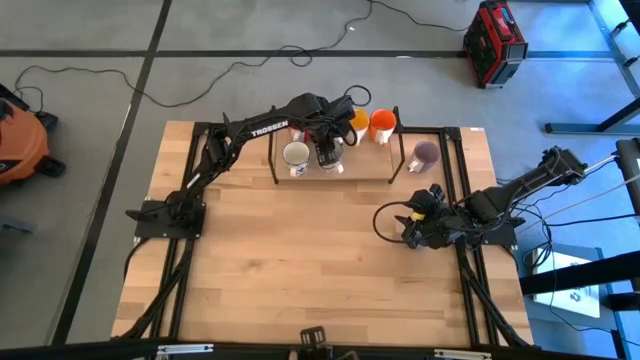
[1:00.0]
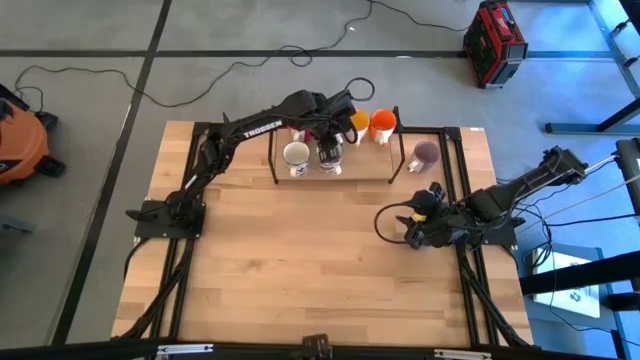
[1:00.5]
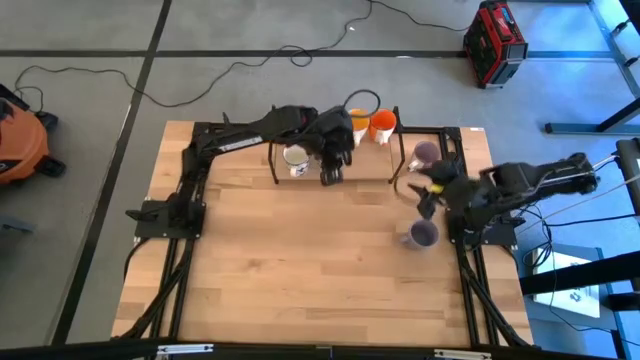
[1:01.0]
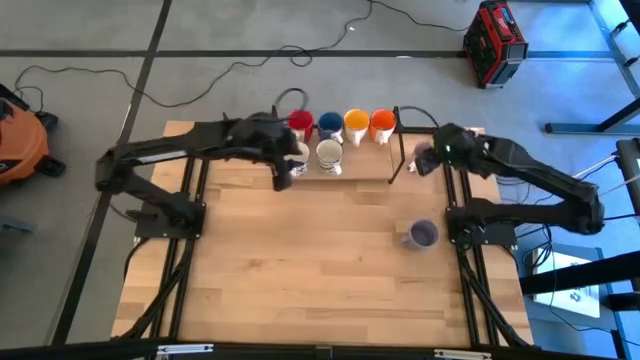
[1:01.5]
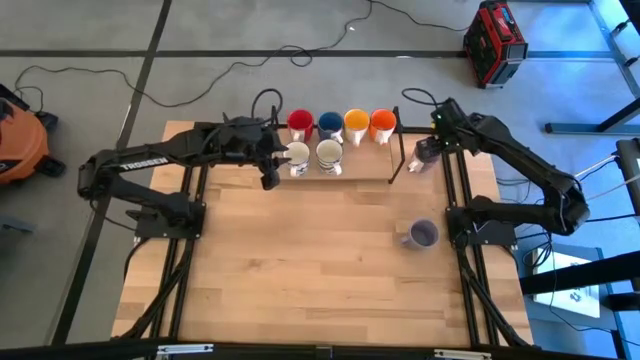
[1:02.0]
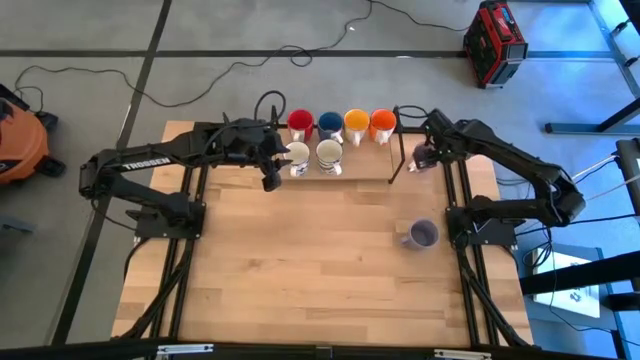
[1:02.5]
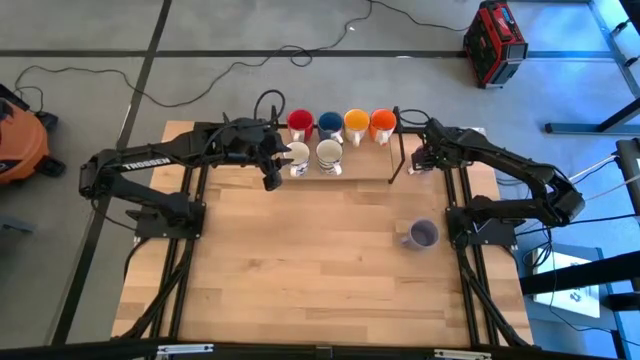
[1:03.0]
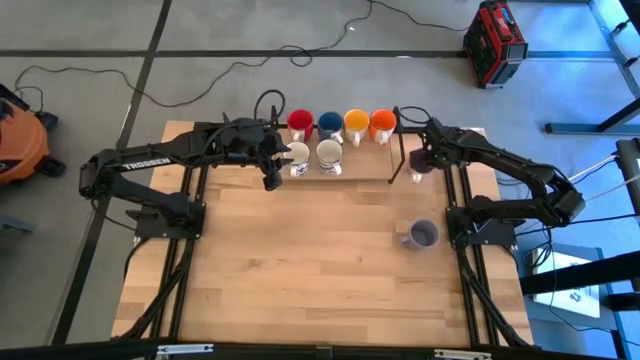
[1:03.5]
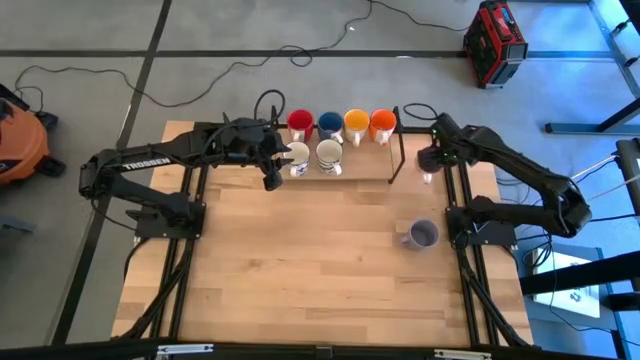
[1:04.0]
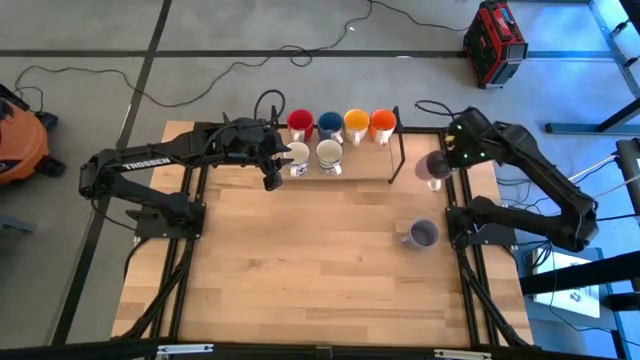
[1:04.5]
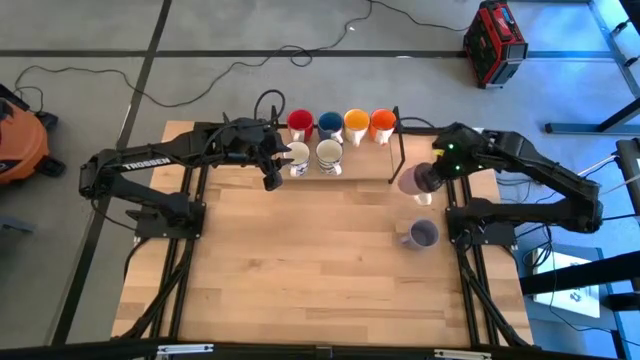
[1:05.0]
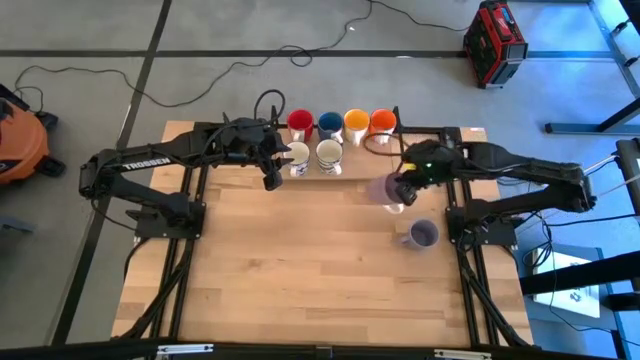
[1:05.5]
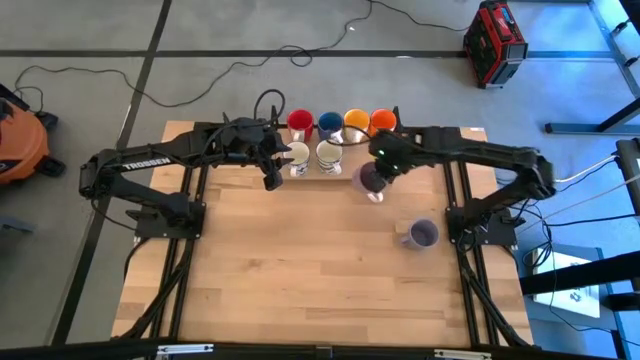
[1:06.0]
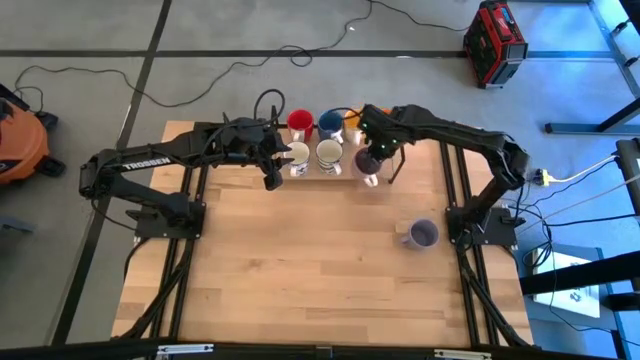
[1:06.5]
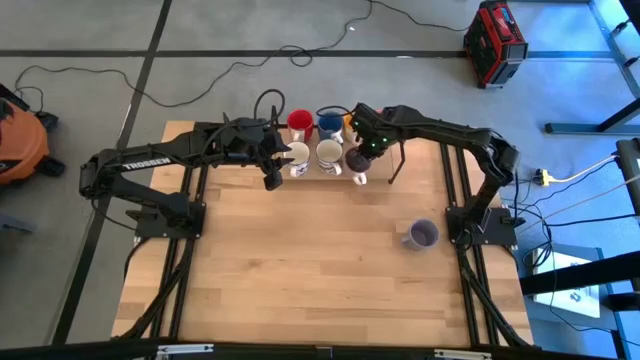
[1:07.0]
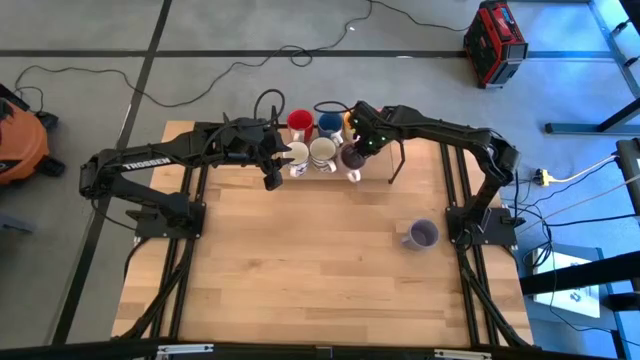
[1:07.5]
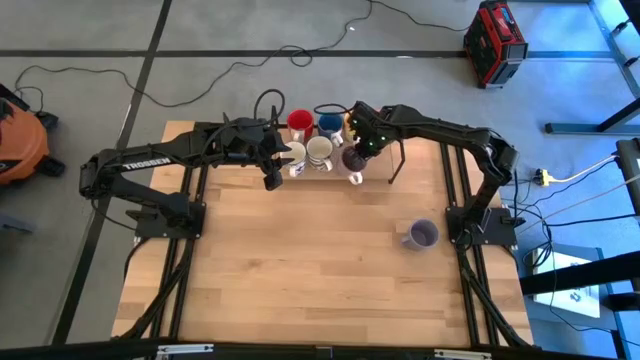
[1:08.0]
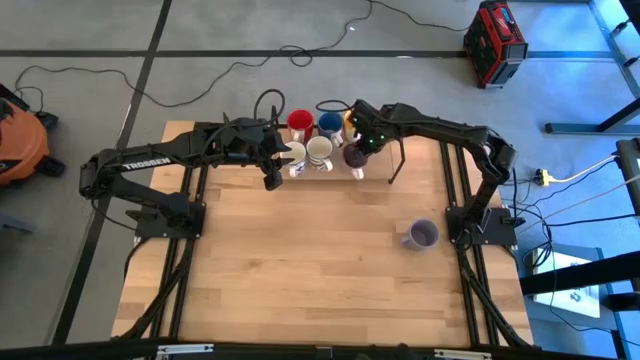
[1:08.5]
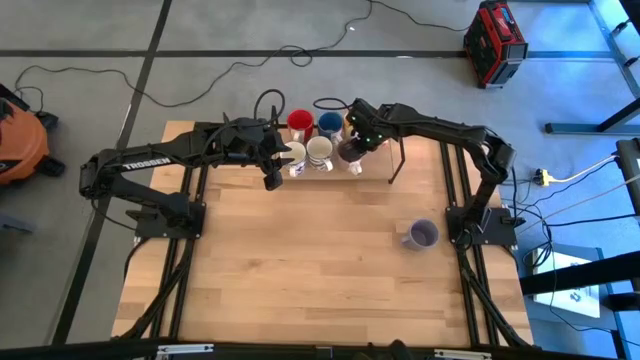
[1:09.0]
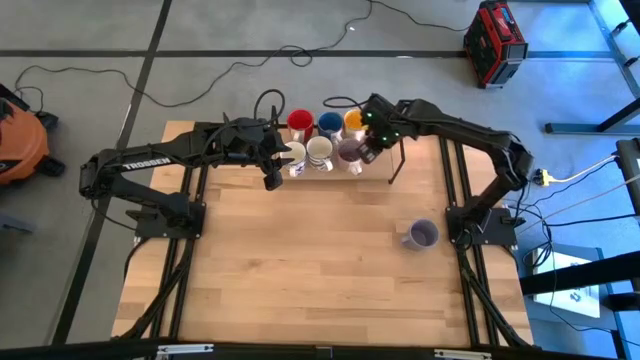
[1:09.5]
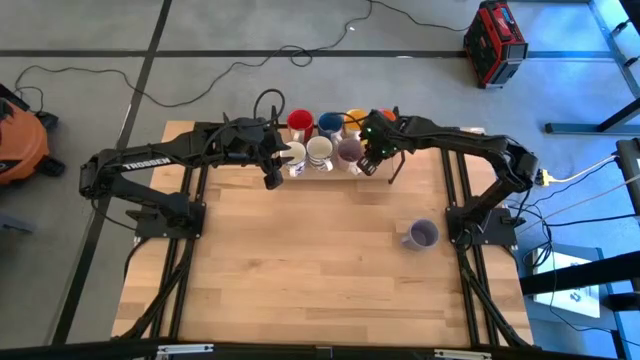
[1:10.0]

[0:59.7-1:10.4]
Task: Place coffee mugs
Put the violet mug on the shelf

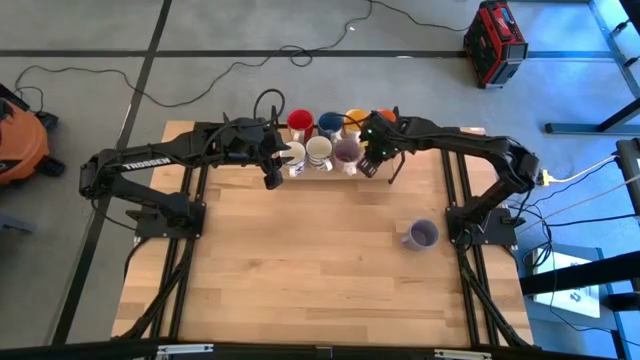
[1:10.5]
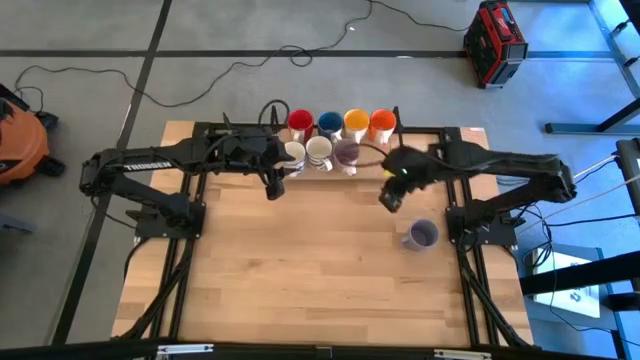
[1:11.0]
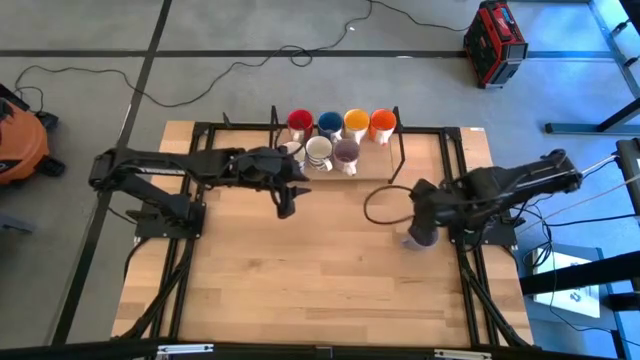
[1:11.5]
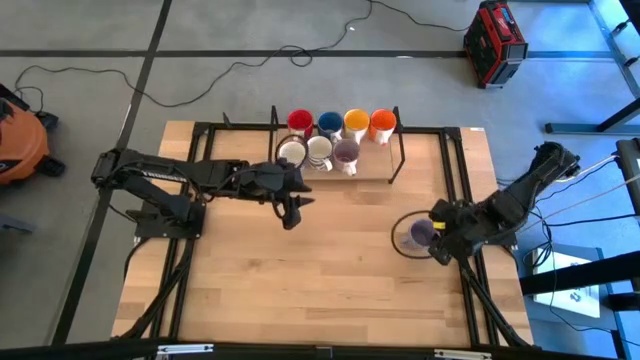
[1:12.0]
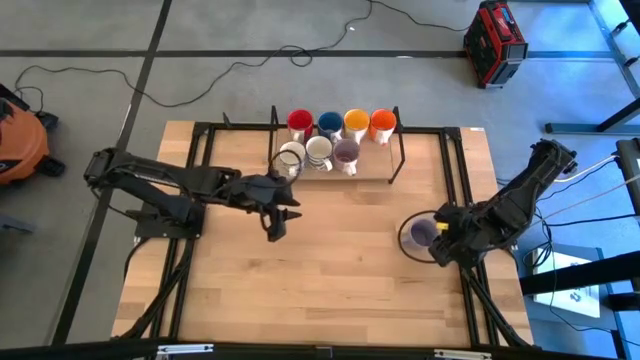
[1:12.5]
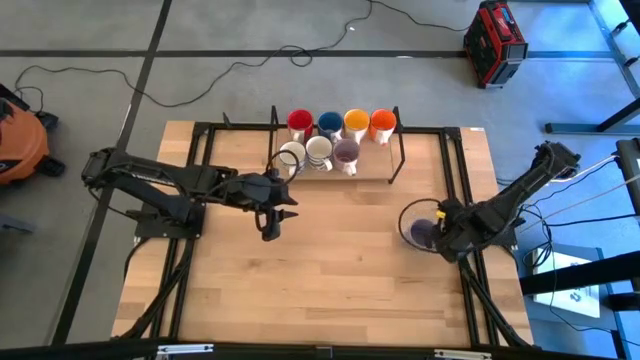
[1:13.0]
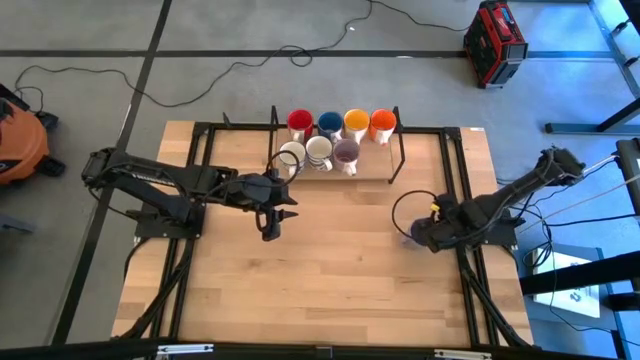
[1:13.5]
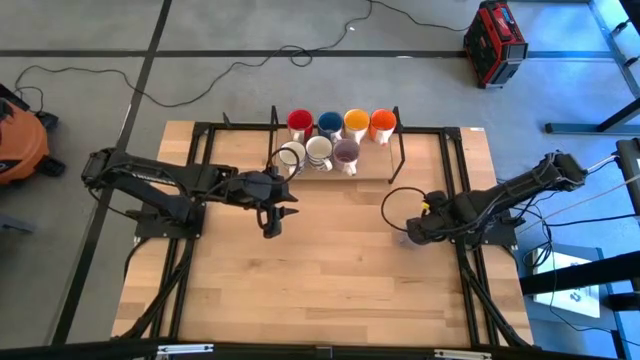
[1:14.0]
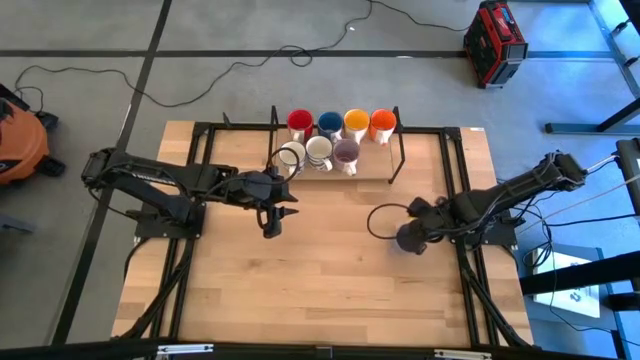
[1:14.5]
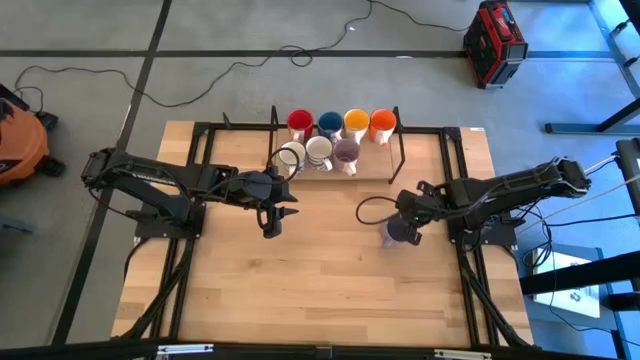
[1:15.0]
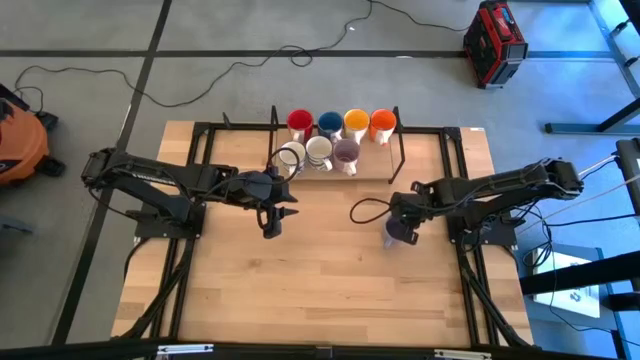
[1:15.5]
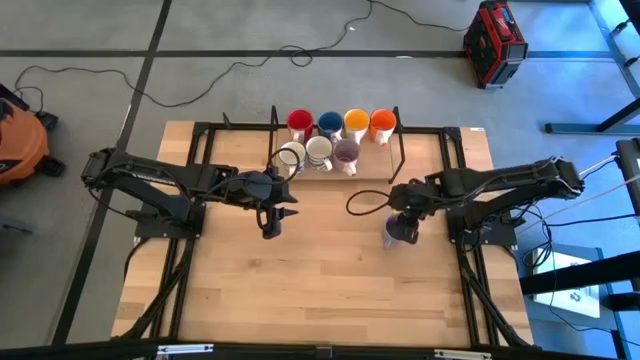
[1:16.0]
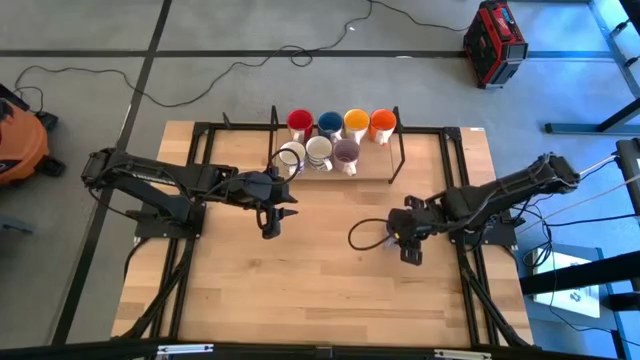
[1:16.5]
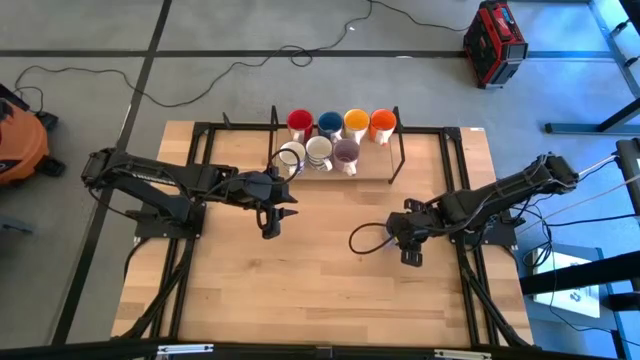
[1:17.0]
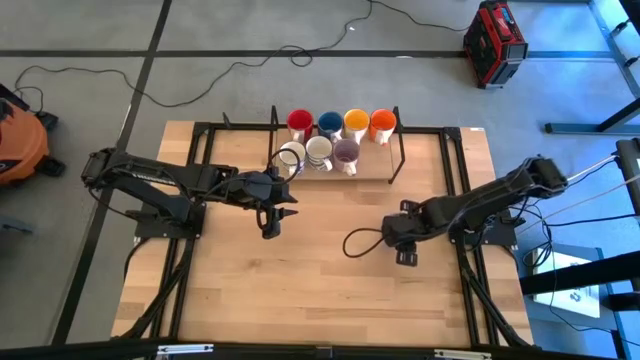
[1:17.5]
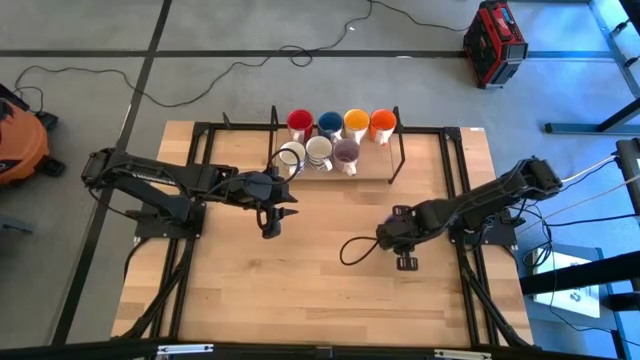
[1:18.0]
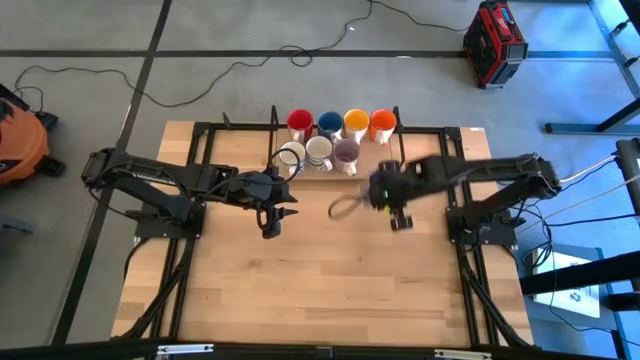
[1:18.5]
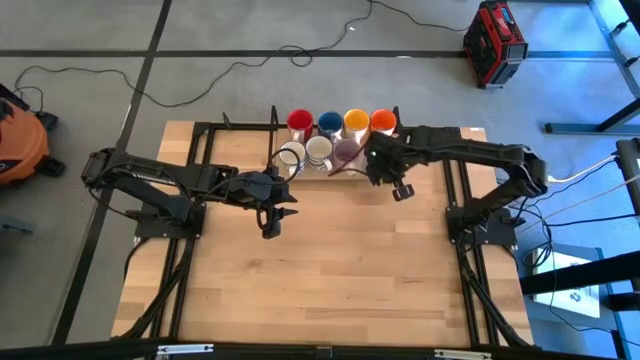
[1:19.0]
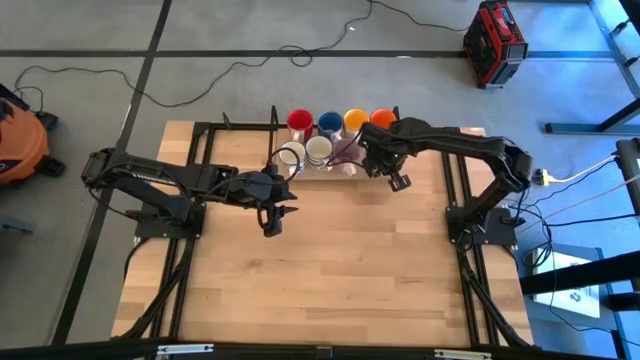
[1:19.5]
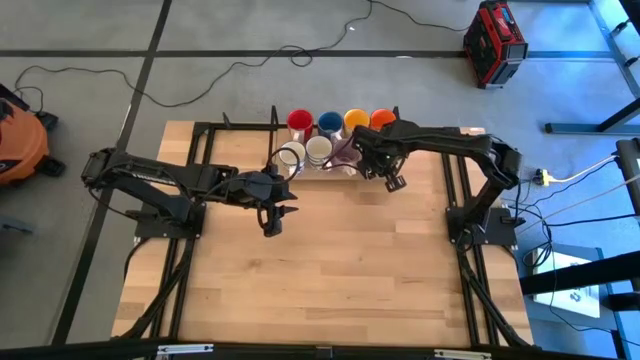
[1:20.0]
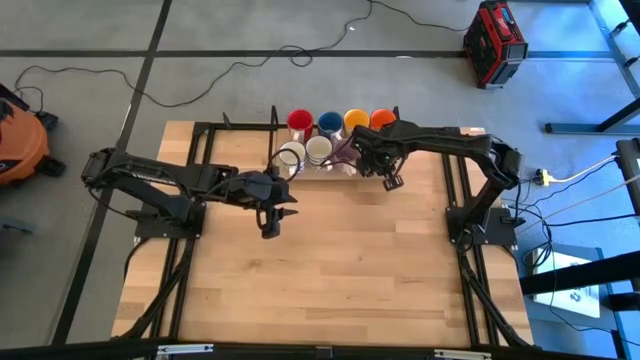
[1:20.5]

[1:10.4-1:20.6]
Put the dark violet mug on the shelf aligned with the orange mug
